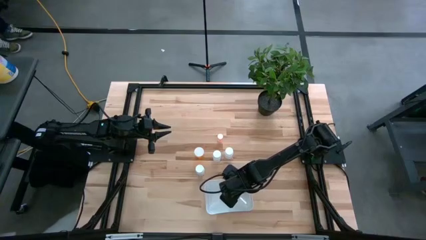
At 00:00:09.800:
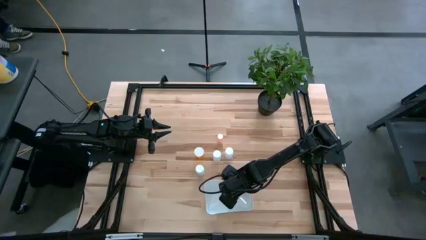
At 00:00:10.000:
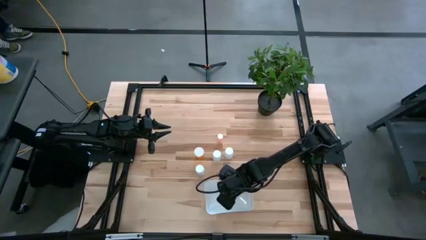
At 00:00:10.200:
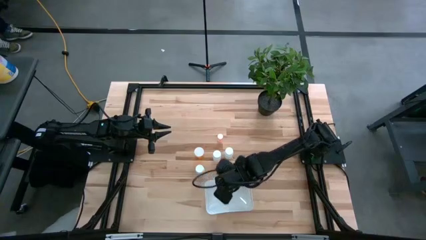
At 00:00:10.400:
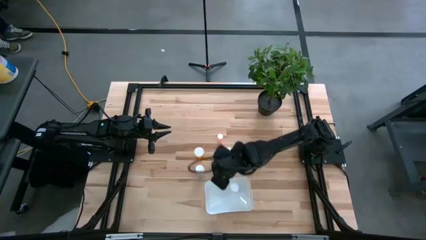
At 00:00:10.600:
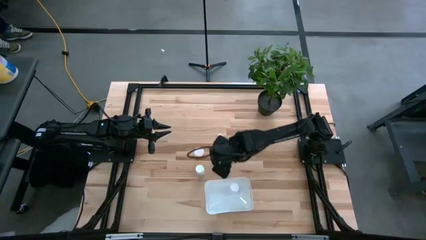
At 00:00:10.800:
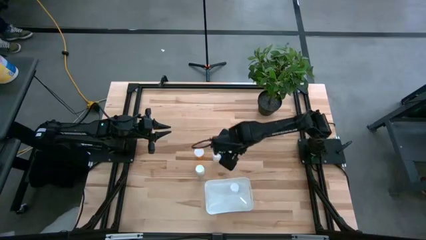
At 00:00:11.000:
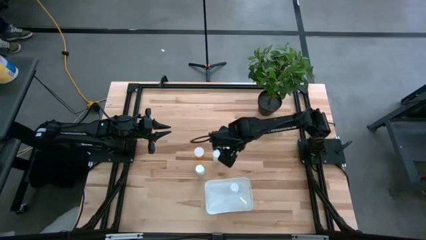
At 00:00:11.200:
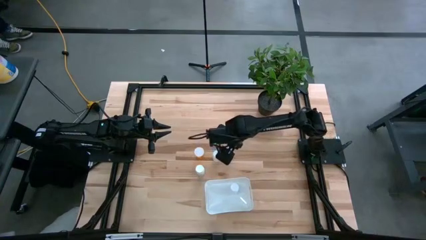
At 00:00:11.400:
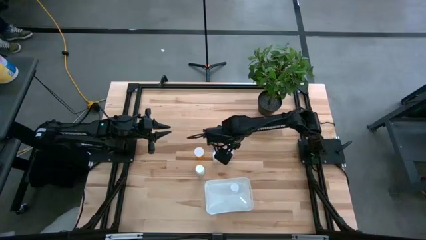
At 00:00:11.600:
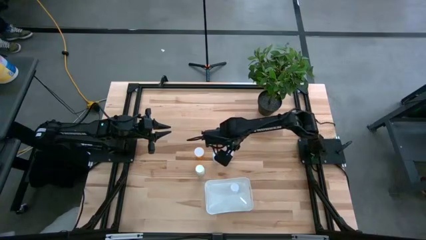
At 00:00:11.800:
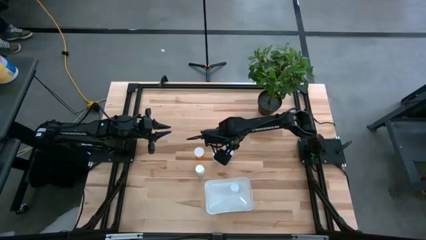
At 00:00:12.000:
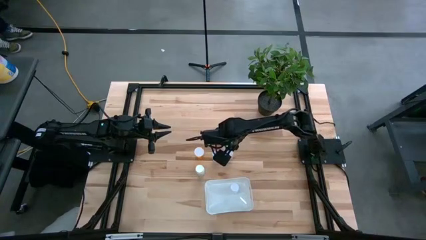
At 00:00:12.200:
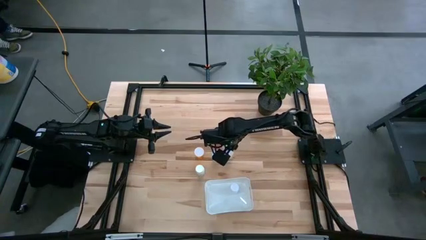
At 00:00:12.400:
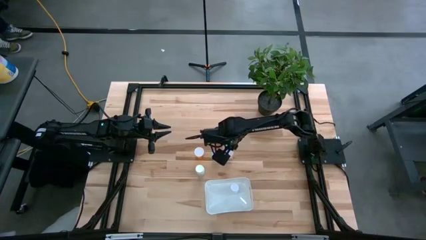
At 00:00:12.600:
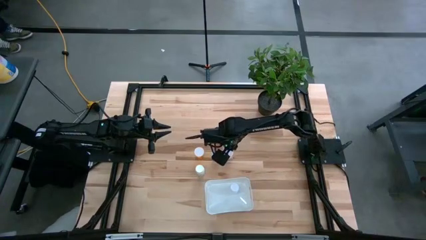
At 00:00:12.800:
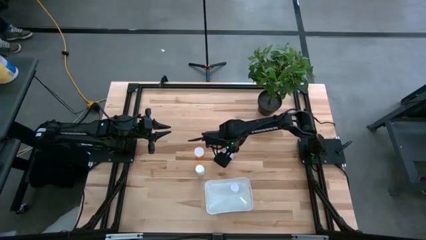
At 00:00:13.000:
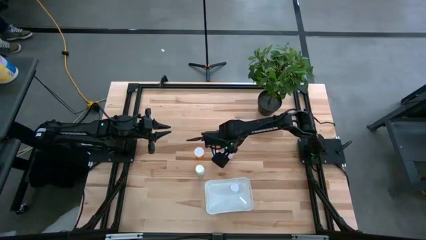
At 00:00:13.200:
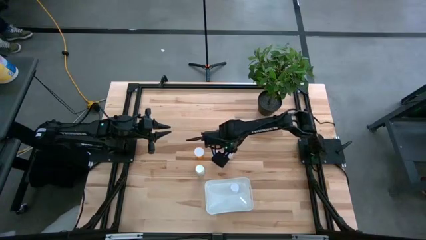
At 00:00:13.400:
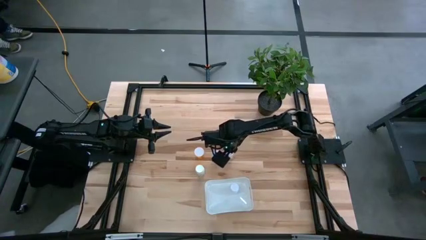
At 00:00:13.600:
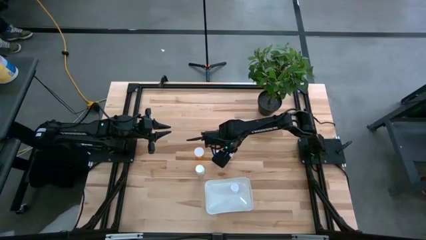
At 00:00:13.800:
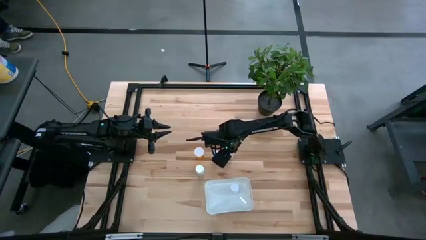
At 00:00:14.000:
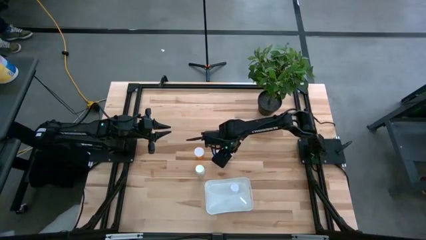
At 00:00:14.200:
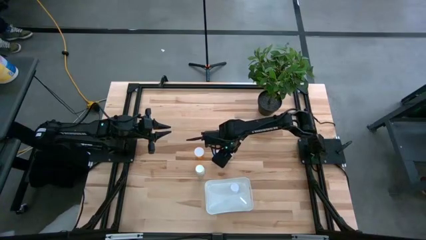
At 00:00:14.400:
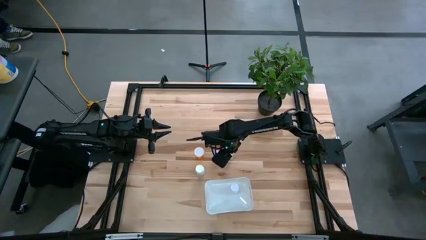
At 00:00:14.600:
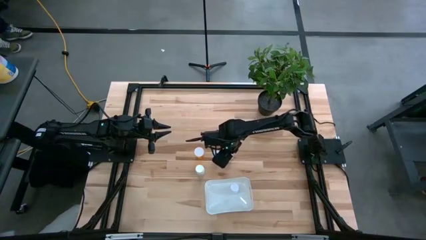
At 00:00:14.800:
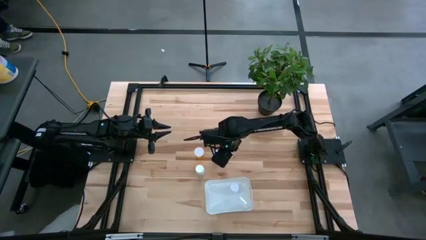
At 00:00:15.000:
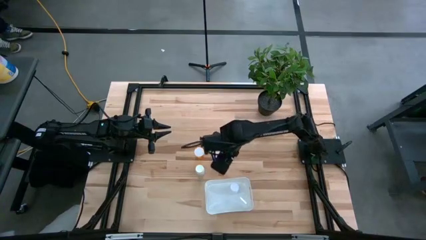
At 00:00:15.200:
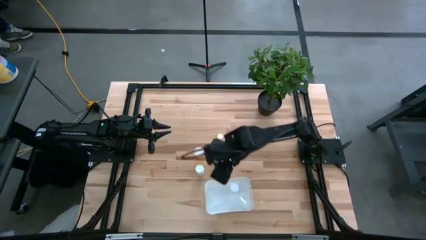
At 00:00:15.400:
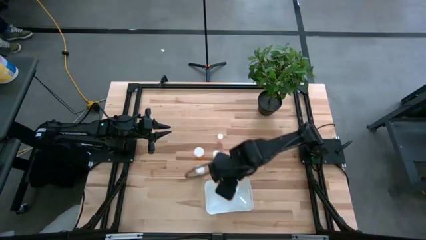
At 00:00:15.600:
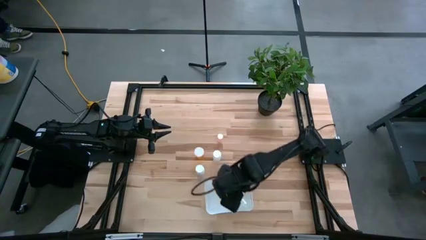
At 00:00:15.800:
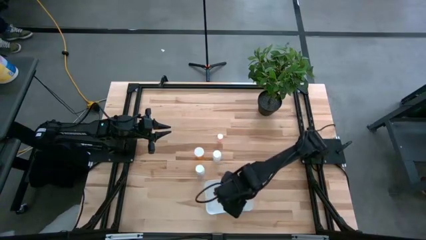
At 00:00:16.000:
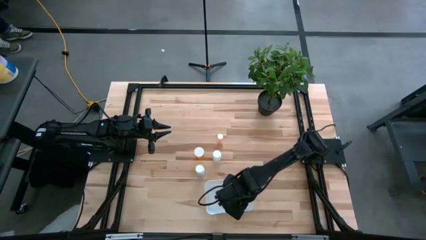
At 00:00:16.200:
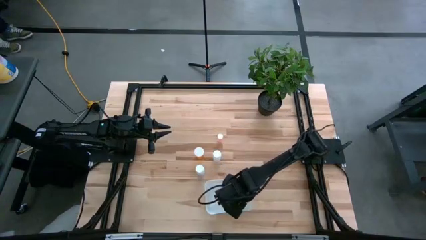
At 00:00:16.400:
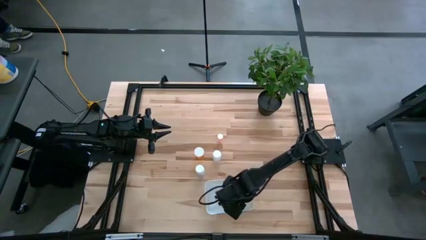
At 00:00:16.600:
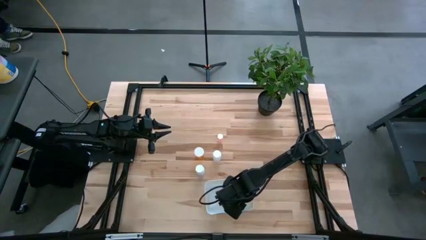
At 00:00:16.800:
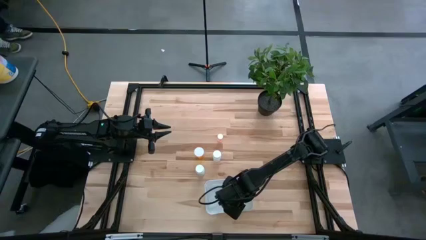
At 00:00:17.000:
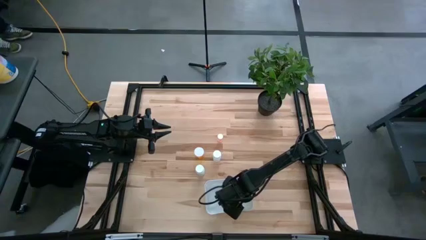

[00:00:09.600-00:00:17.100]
Task: Pick and place pill bottles into a basket
Put the white pill bottle into the white bin

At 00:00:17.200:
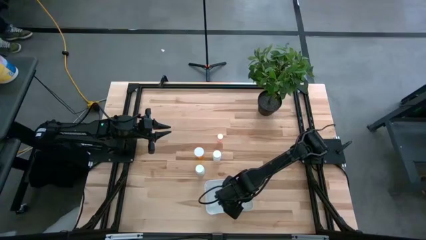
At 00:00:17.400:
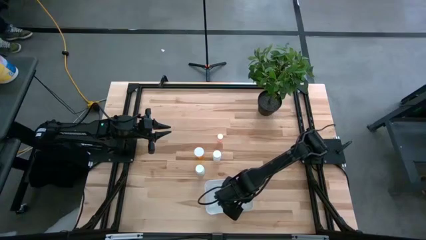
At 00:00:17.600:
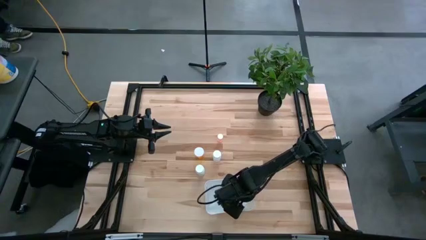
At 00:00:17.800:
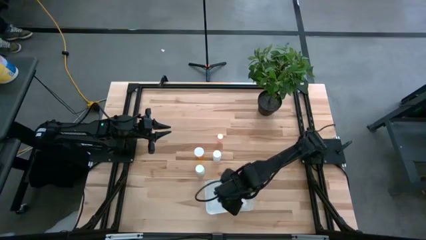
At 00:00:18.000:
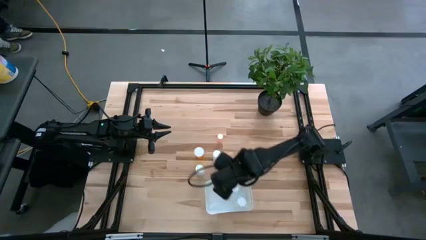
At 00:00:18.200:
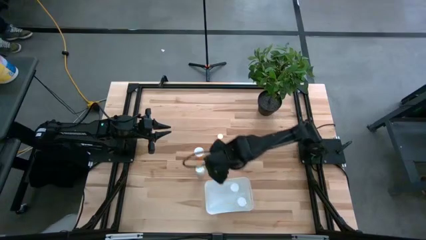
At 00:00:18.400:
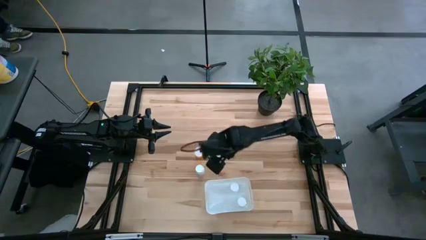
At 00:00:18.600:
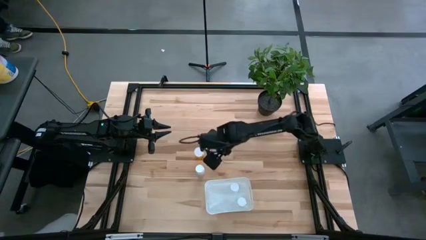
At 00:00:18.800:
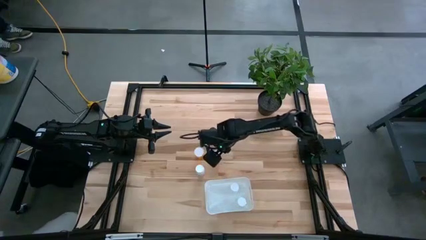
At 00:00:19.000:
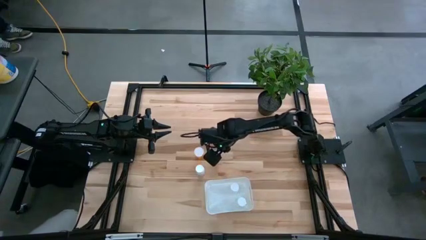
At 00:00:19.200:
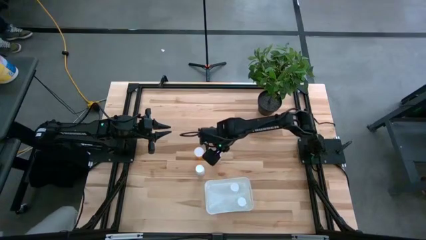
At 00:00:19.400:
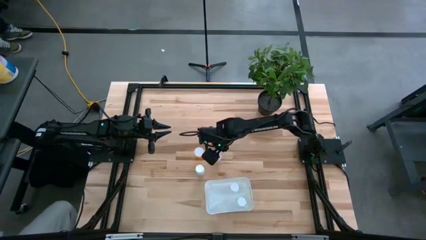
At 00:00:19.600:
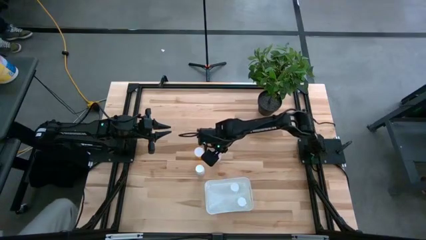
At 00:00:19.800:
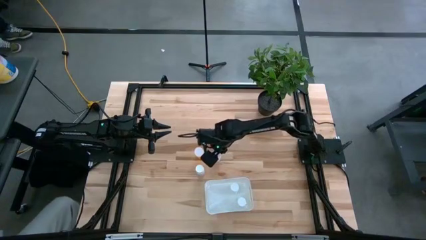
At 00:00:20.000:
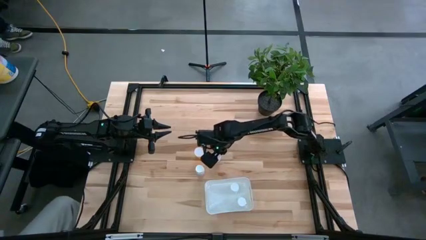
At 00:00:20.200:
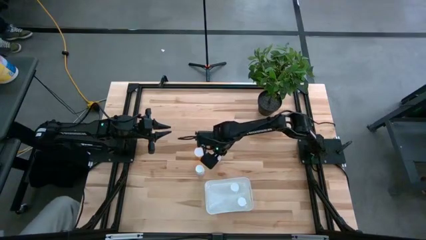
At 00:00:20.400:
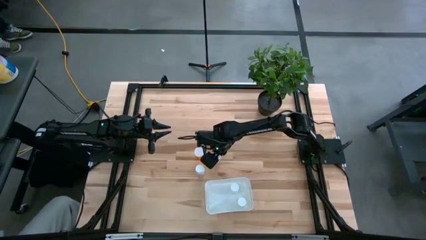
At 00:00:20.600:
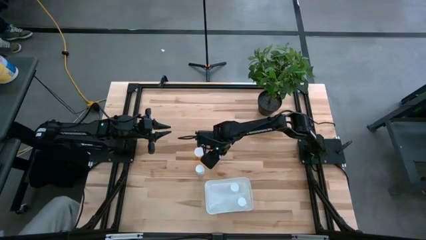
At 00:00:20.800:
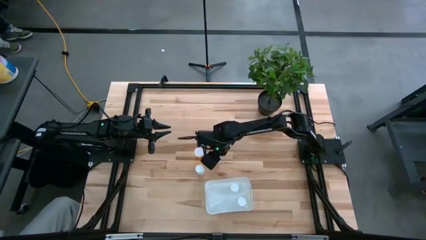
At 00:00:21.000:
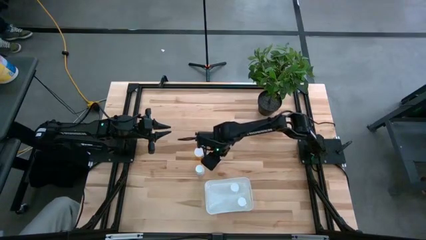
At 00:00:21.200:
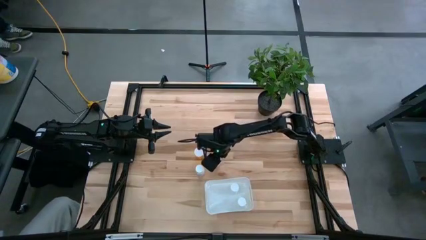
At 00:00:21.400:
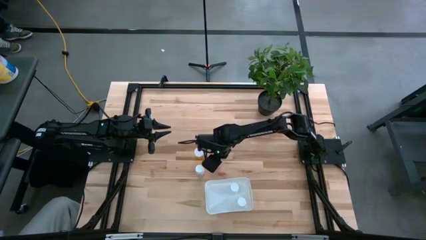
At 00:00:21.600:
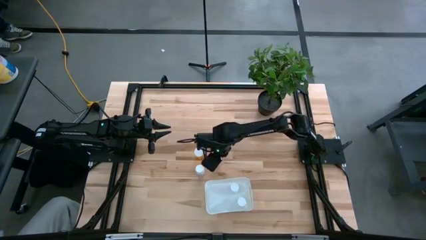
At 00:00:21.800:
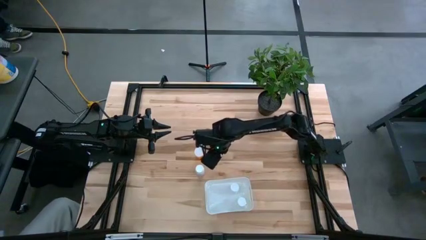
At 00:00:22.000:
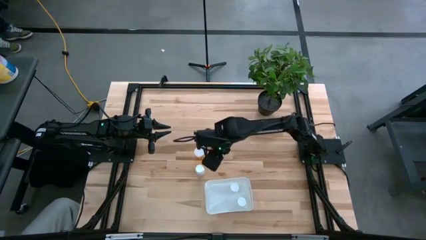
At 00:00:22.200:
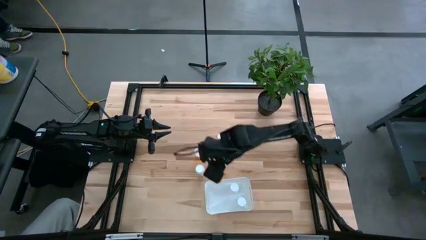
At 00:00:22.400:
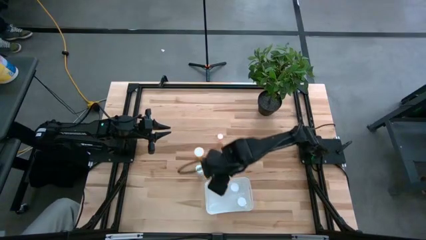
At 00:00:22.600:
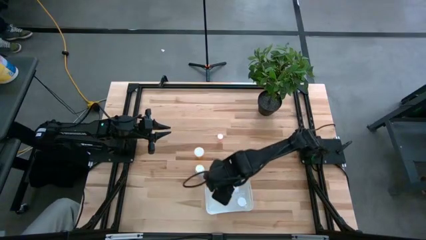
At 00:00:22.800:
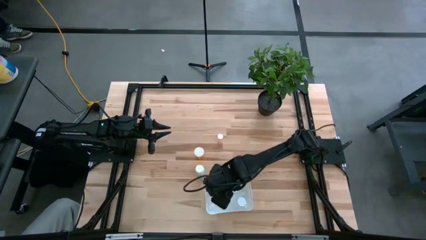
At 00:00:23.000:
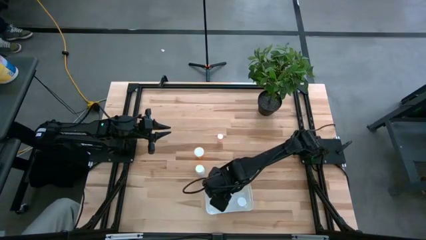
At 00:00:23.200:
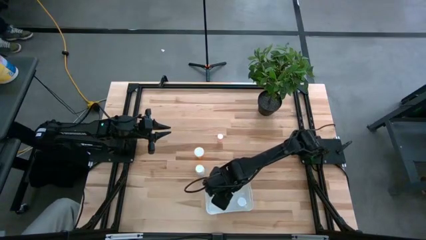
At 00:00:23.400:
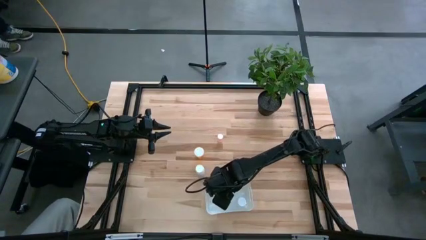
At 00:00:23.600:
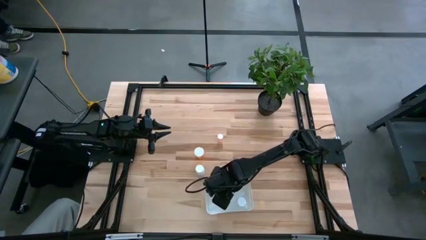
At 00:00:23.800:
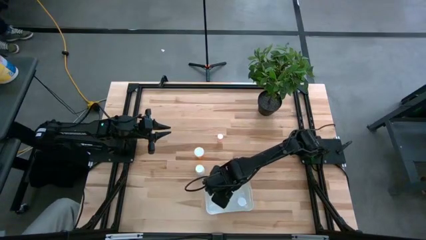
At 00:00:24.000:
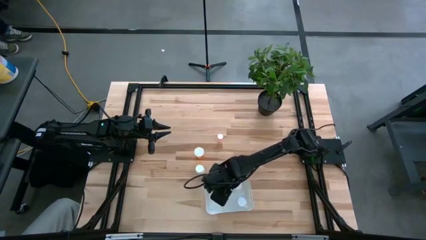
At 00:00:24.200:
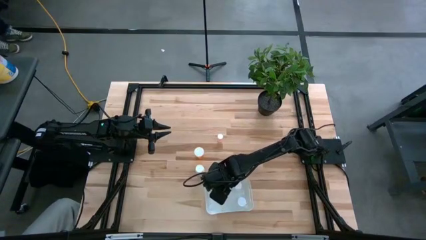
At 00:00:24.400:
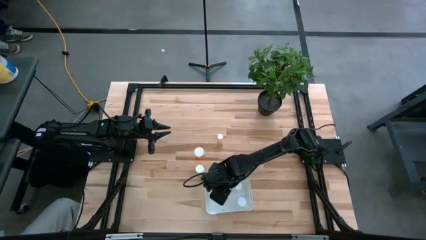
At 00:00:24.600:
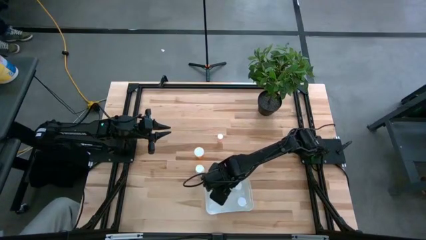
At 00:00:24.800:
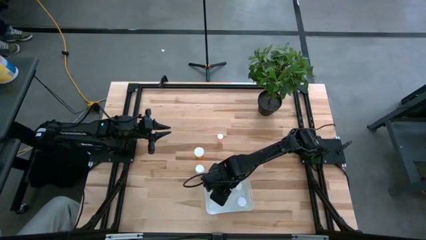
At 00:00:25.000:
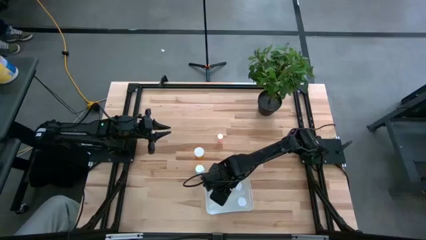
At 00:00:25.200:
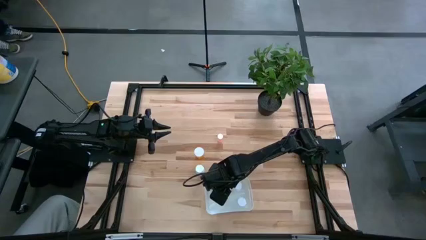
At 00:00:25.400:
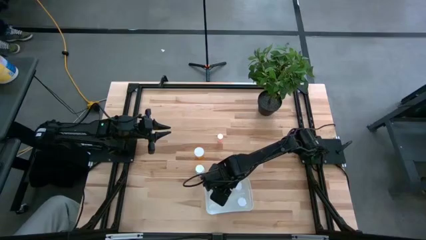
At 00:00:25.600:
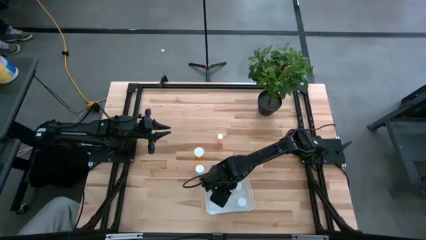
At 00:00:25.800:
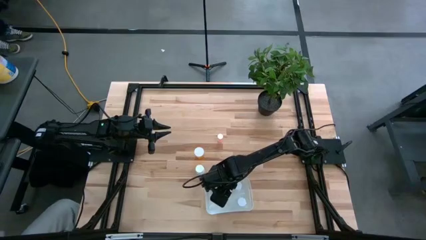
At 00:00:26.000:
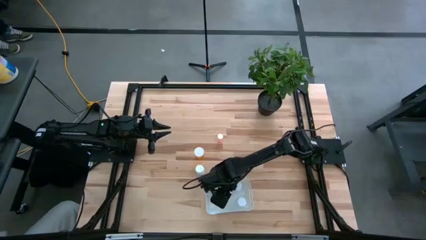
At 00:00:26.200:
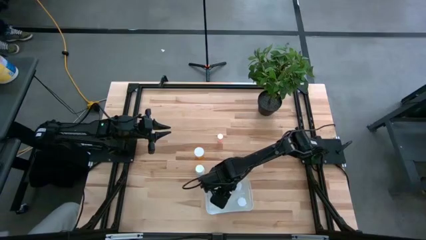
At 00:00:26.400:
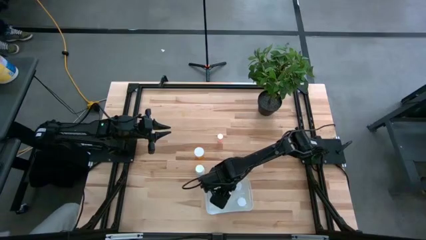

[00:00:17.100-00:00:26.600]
Put the white pill bottle into the white bin
